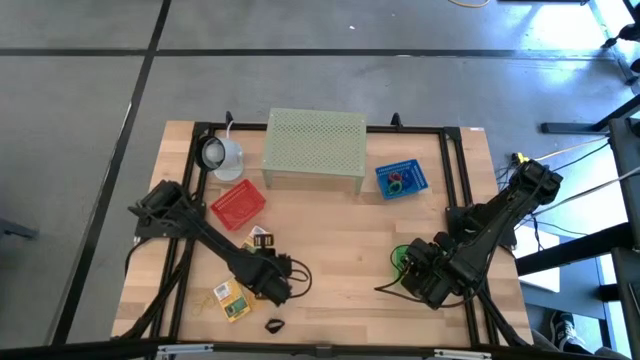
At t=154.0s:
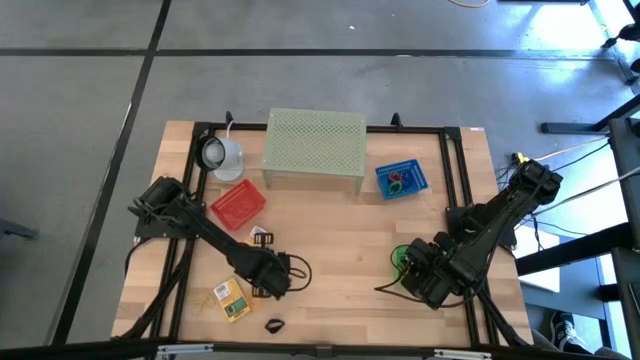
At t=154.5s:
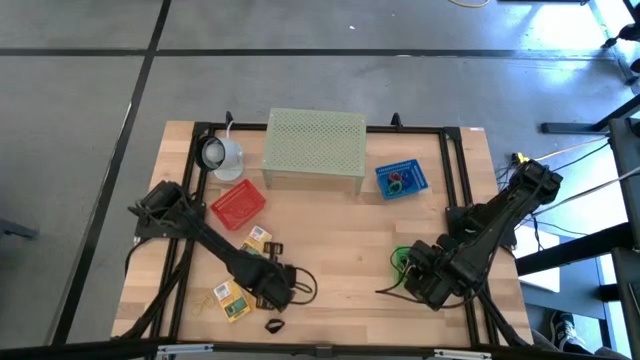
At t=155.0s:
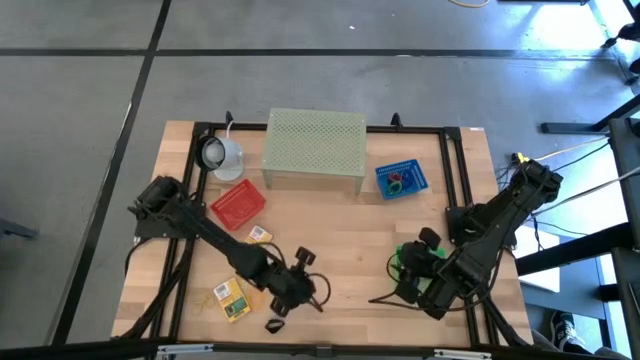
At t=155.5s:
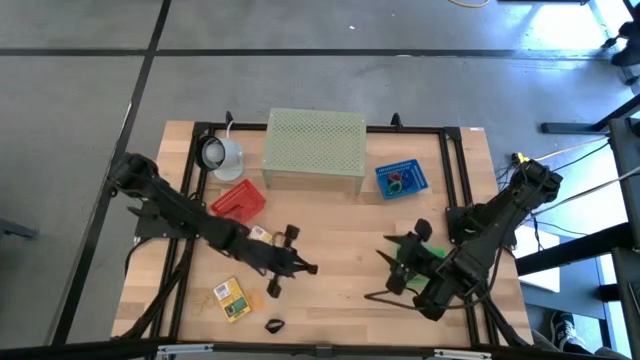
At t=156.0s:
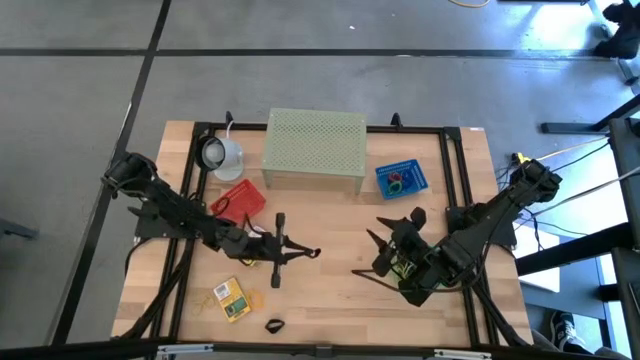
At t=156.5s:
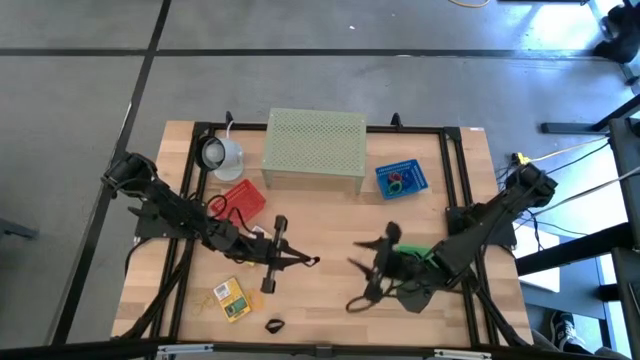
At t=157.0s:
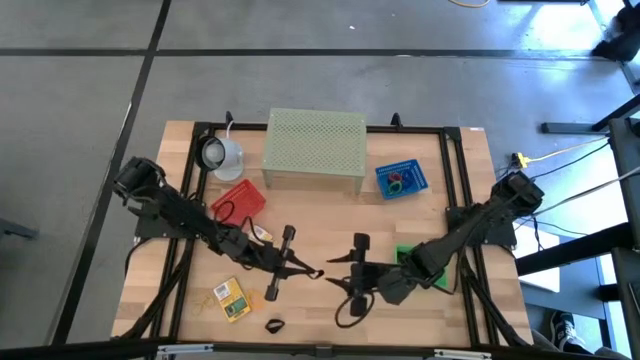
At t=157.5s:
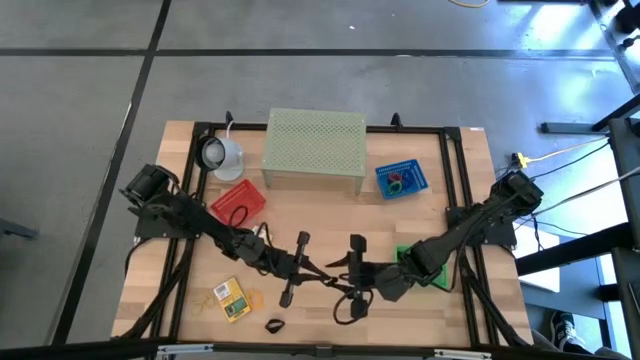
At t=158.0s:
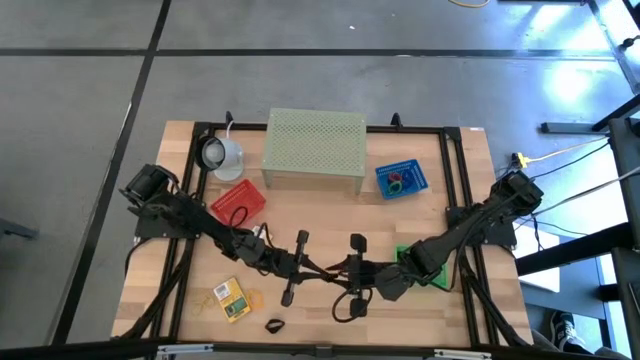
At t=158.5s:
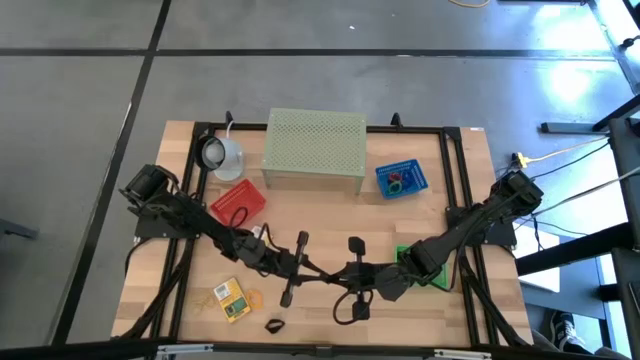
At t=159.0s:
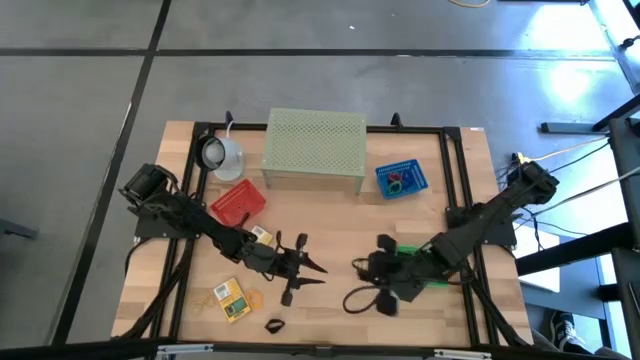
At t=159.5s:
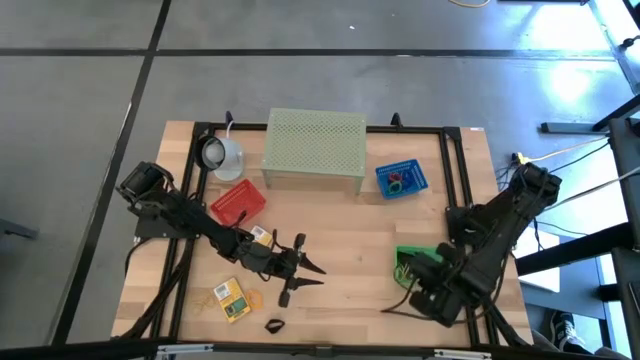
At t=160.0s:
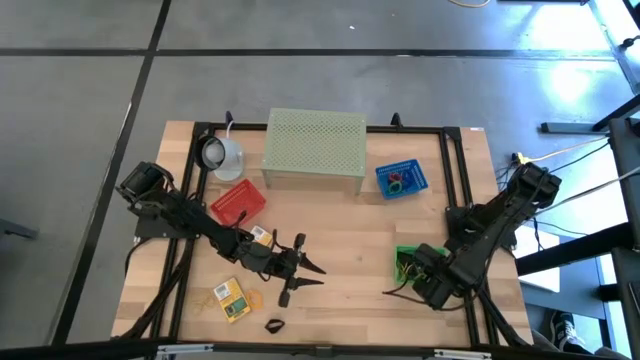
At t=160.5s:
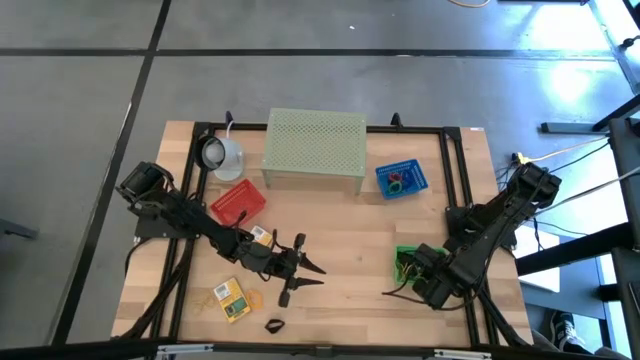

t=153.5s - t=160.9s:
Task: Pick & Place Office Desk Supplies
Put the black rubber band into the green bin

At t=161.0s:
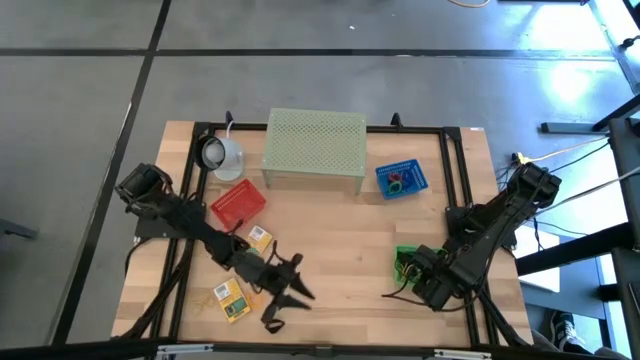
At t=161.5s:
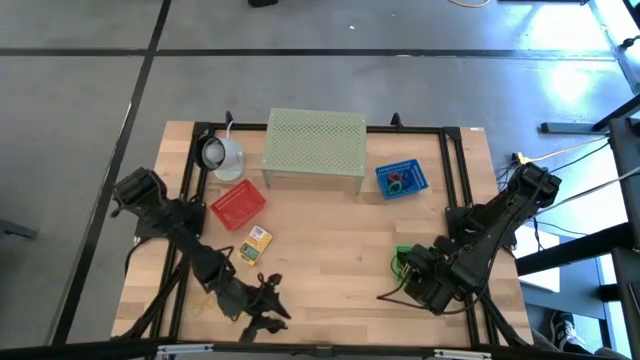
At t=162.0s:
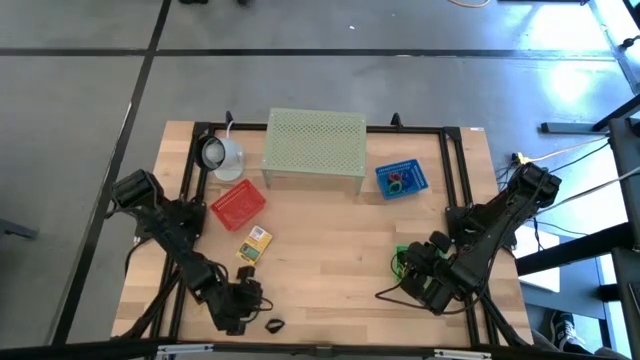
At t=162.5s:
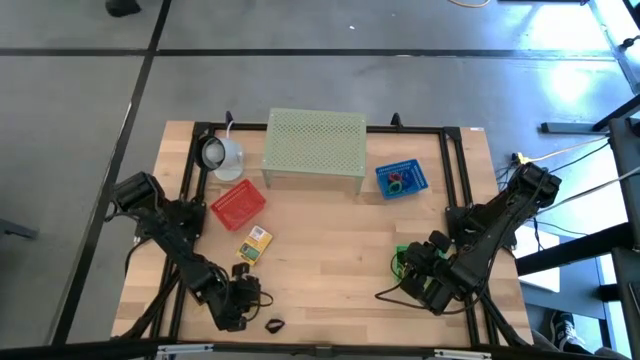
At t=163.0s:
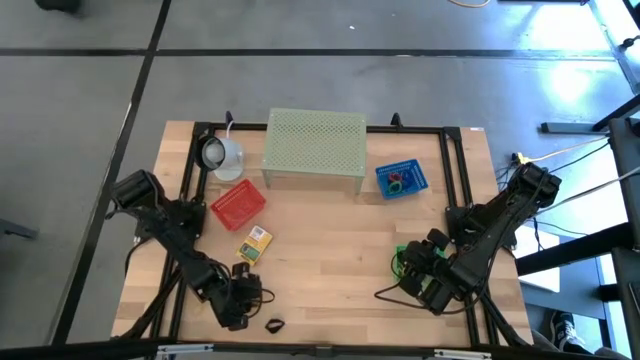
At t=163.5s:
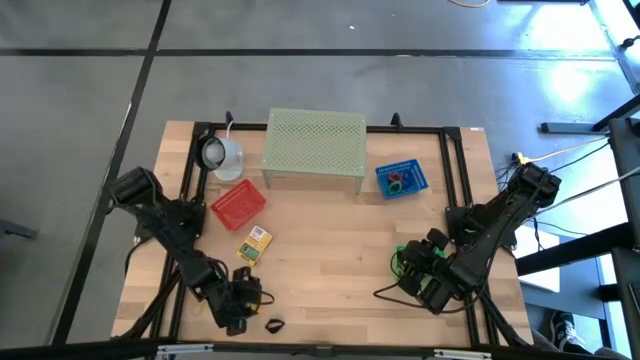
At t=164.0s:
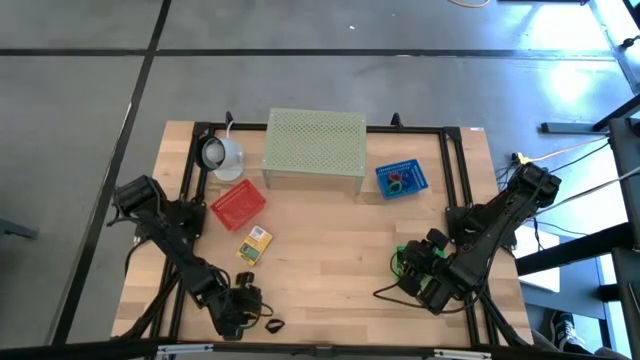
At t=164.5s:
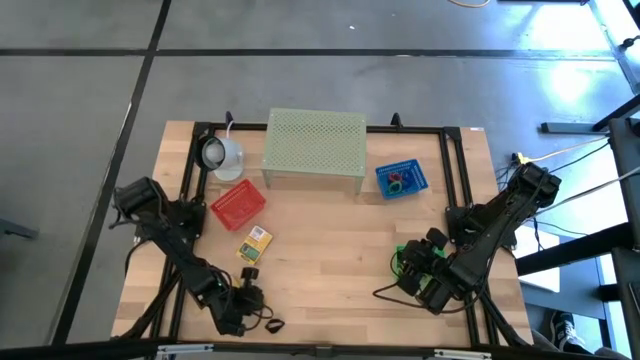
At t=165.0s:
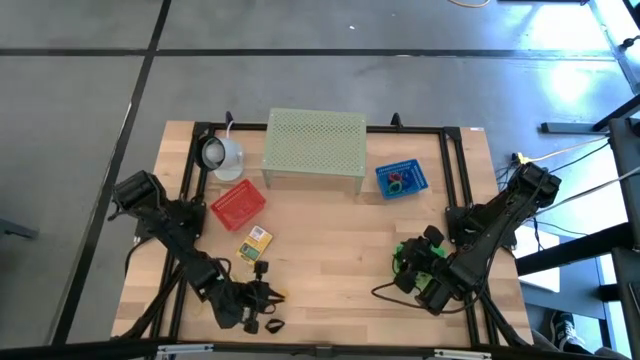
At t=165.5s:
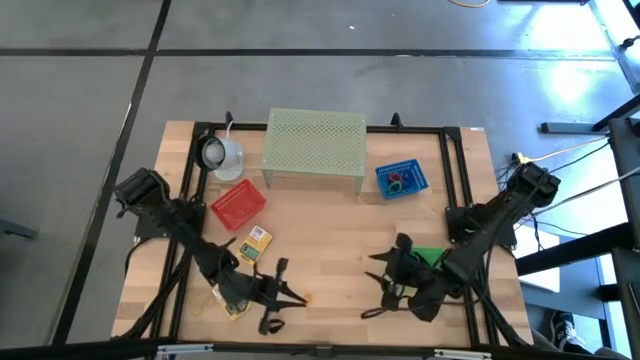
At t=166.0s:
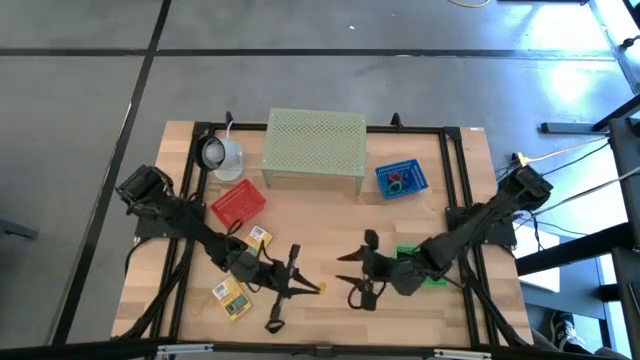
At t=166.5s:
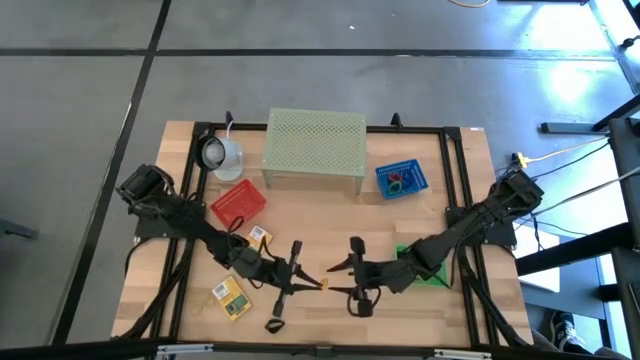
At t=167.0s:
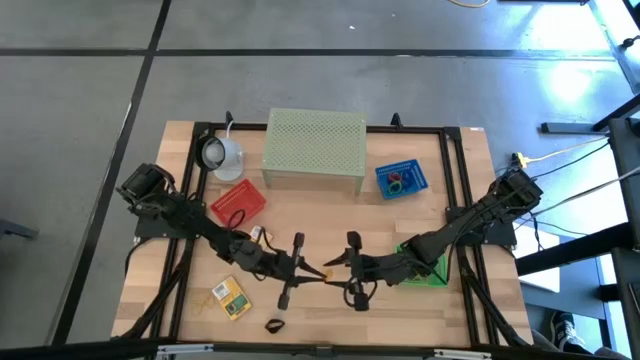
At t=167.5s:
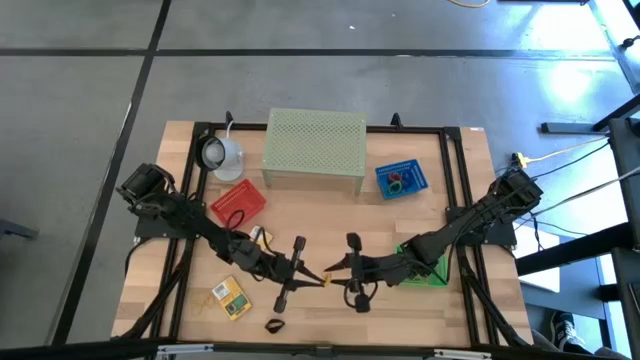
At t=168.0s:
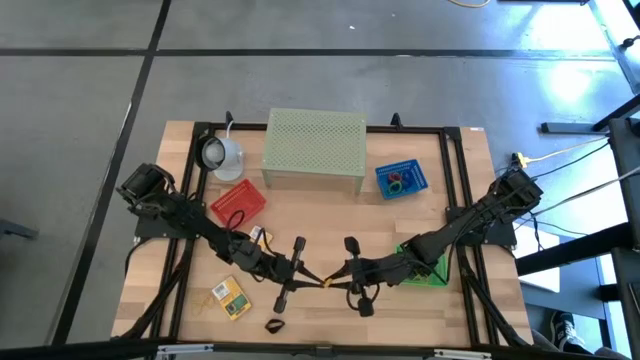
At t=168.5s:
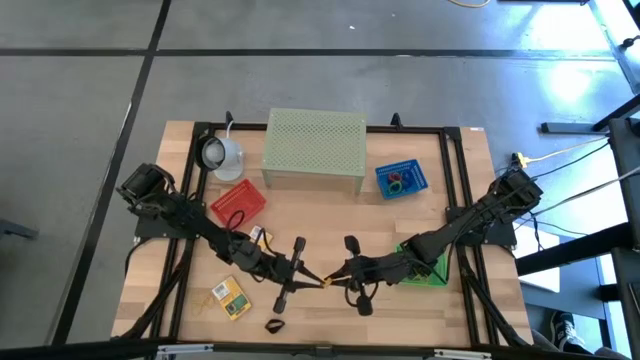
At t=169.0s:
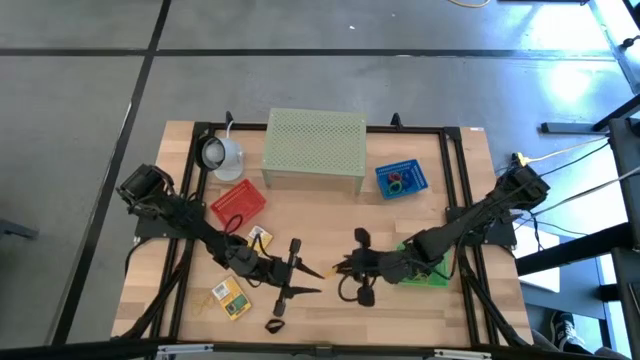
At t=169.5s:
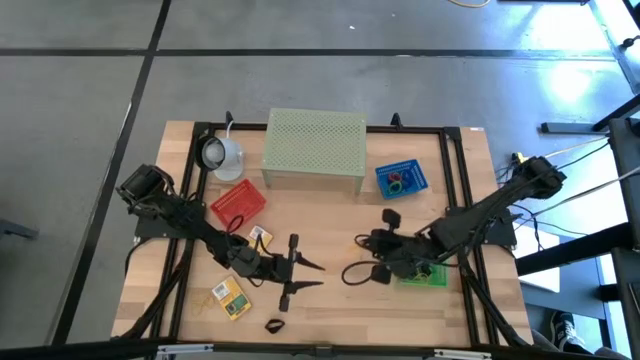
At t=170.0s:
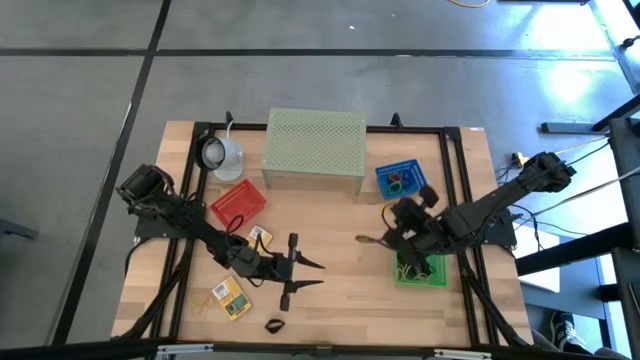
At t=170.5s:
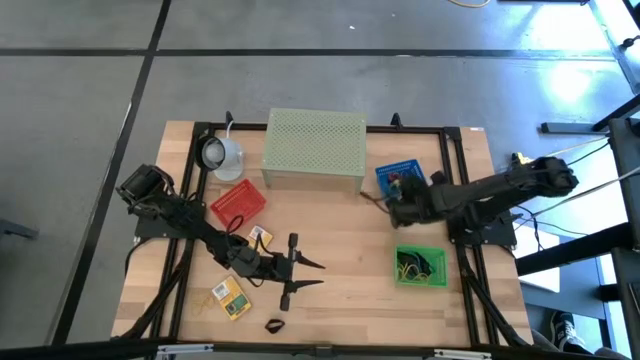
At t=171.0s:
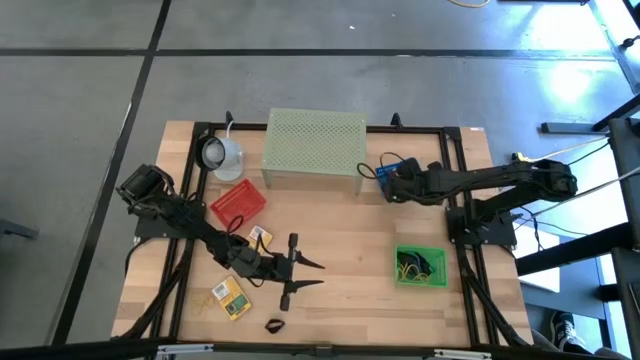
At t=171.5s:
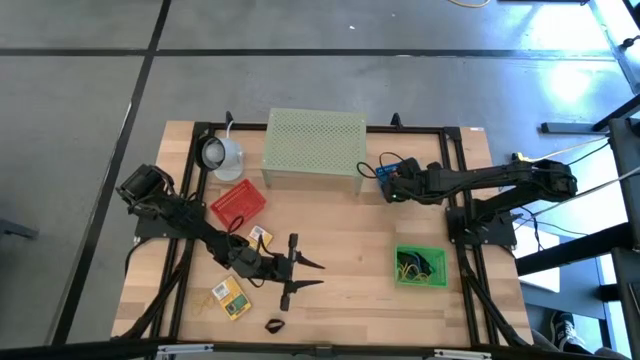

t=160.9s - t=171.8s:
Put the orange spring keychain into the blue bin

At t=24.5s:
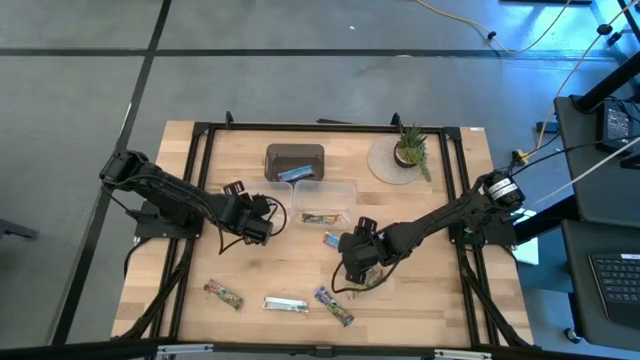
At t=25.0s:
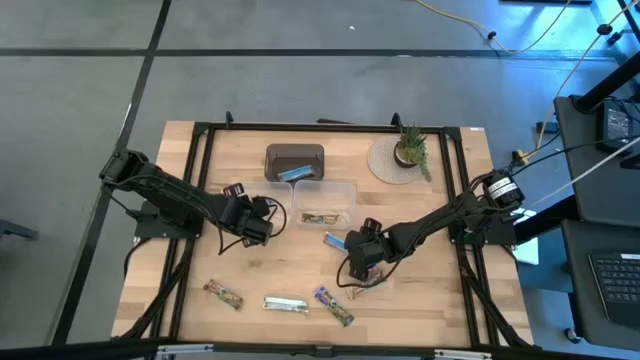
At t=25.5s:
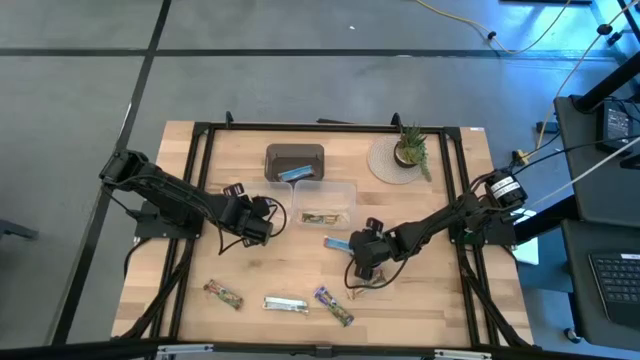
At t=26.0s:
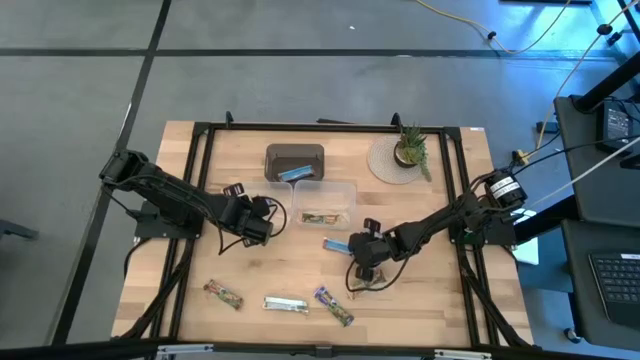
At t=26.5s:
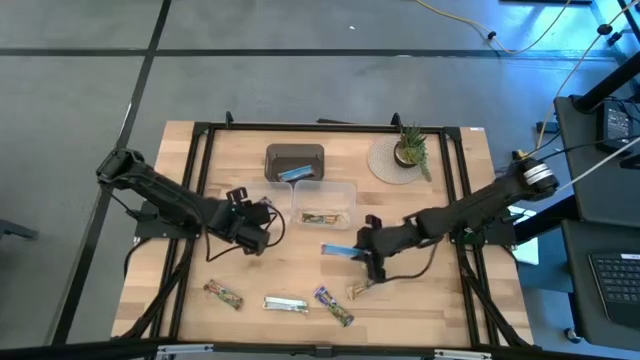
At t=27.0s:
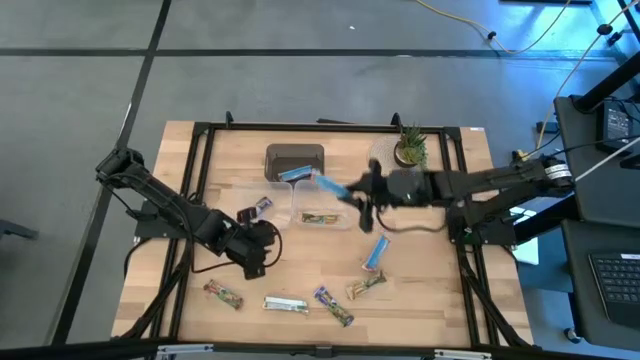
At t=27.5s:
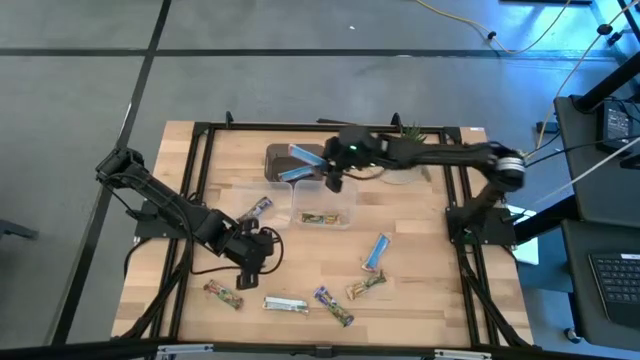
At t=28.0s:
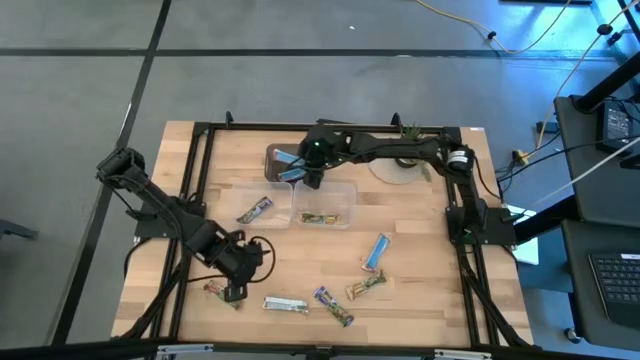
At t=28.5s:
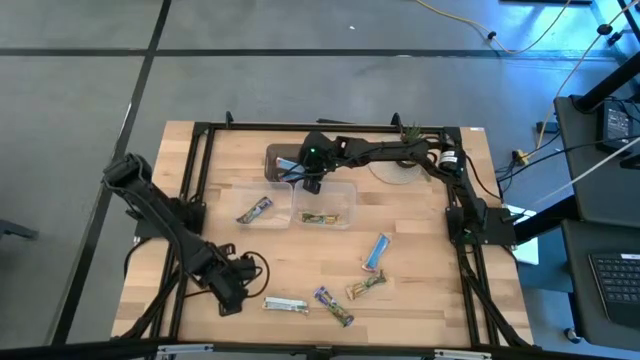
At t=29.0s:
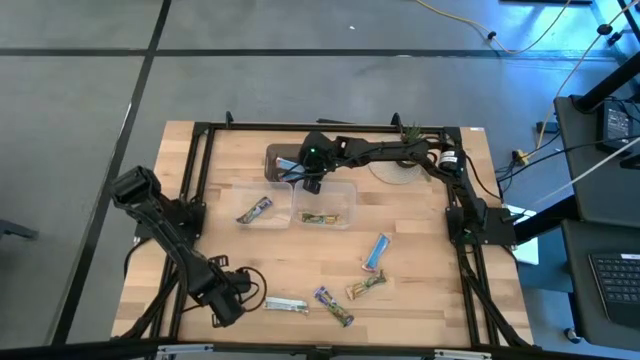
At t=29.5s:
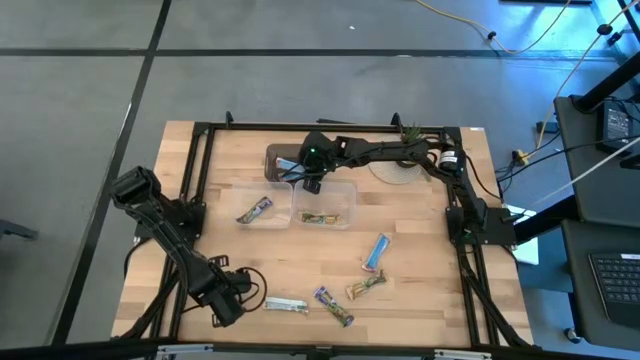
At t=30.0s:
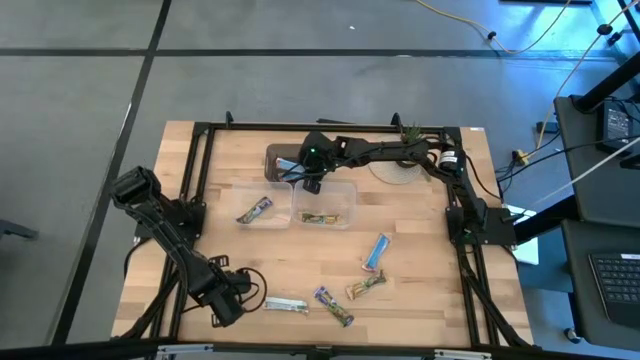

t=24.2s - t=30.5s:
Task: Pick and place Granola Bars by type
Put the red granola bar into the black bin
